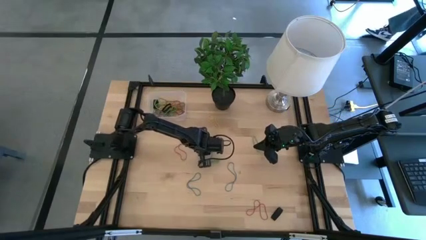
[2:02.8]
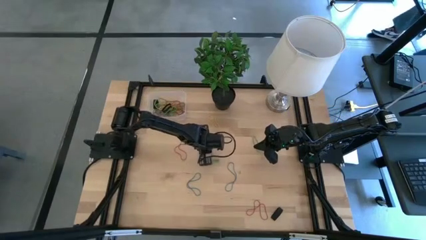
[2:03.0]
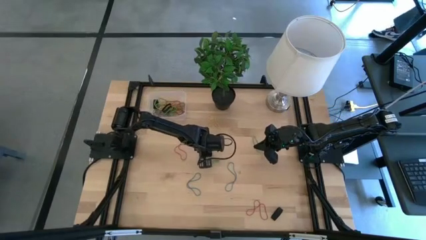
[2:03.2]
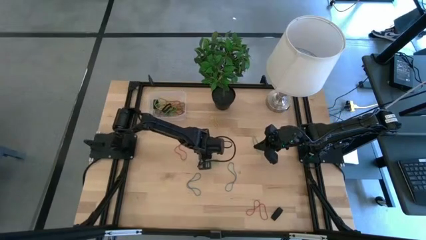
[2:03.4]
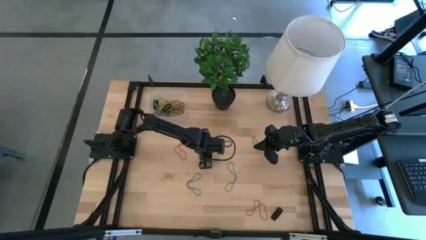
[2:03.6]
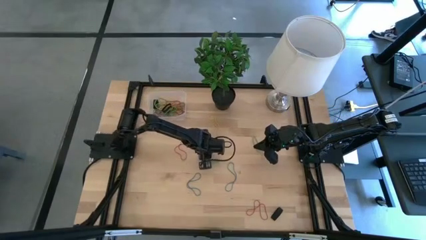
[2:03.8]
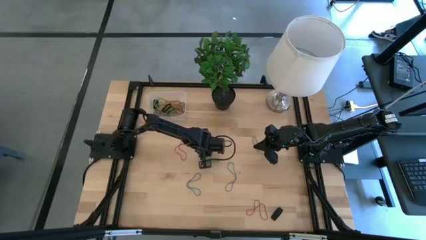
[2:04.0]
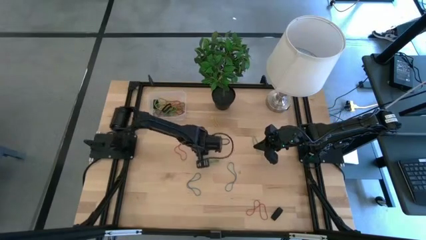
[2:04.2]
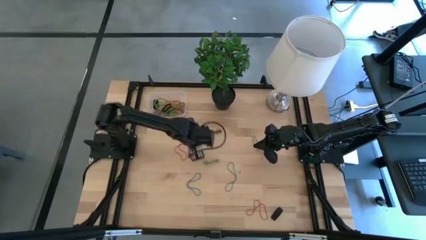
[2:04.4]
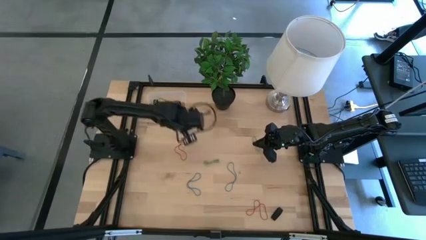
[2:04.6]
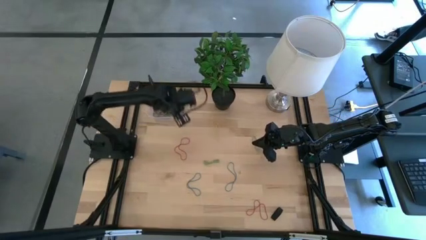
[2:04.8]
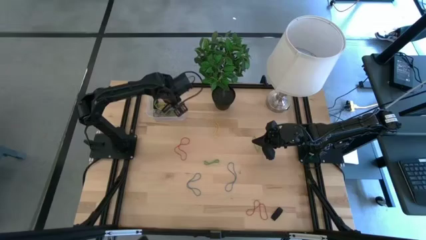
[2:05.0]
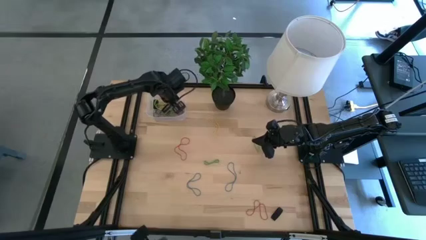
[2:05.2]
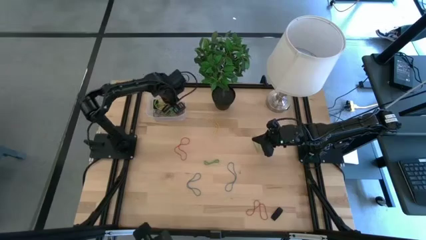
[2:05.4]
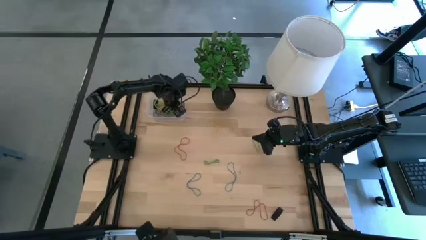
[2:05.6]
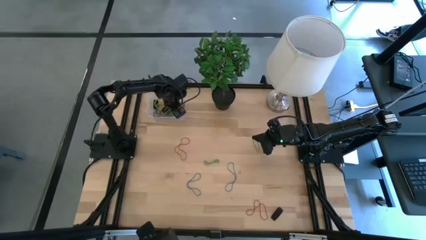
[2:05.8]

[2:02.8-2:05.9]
Task: Pick and place rubber bands into bin
Put the blue rubber band into the transparent bin

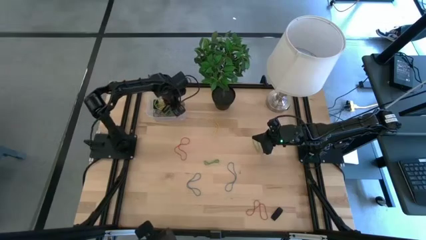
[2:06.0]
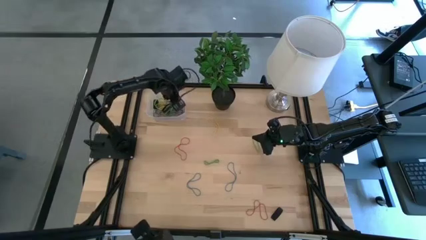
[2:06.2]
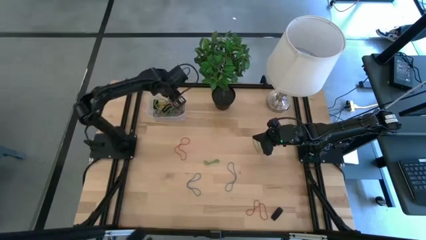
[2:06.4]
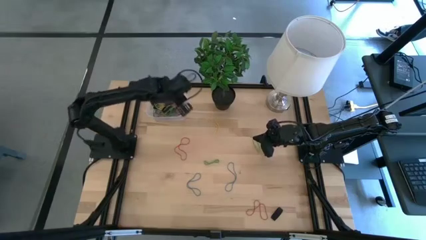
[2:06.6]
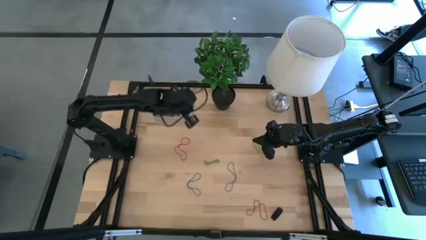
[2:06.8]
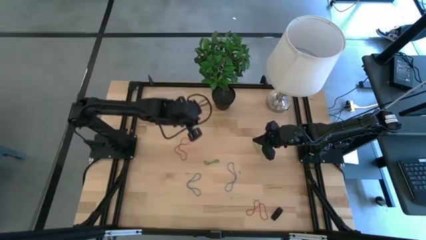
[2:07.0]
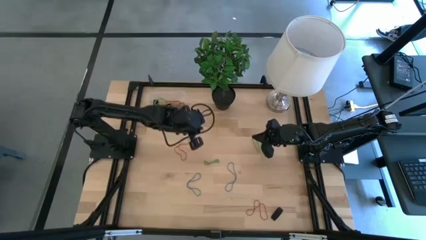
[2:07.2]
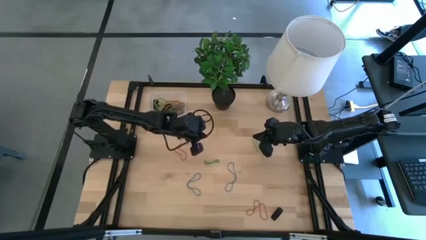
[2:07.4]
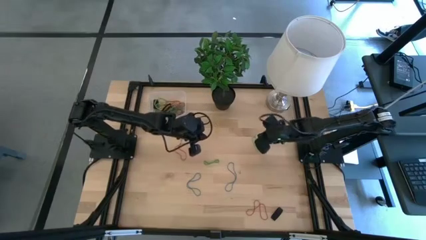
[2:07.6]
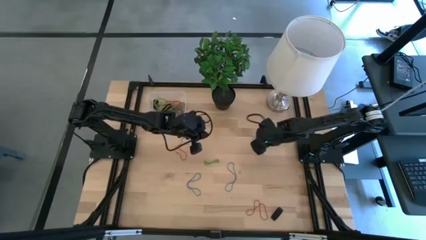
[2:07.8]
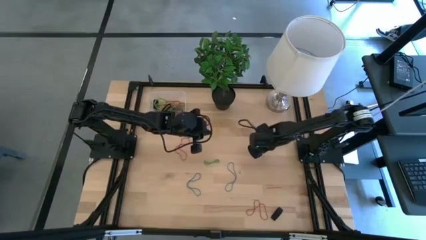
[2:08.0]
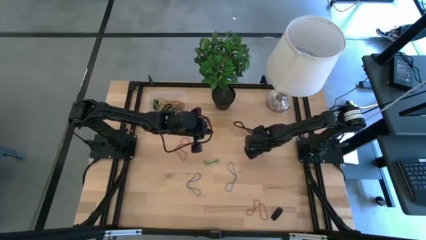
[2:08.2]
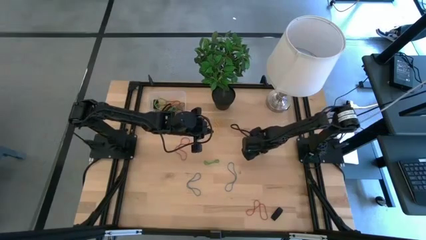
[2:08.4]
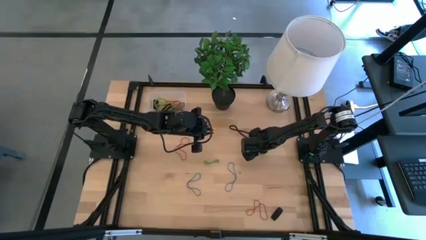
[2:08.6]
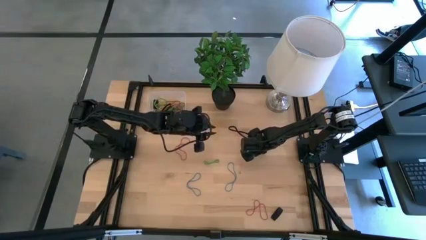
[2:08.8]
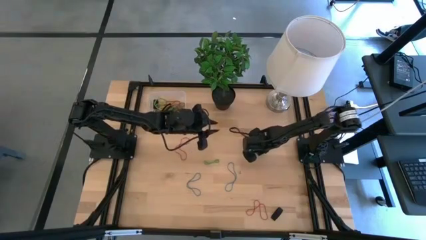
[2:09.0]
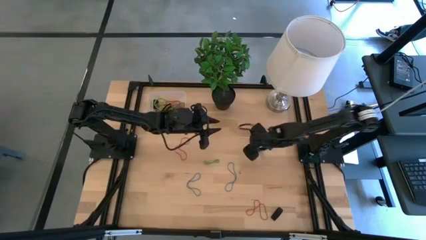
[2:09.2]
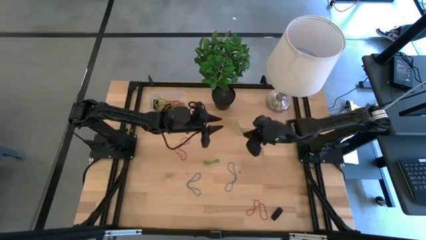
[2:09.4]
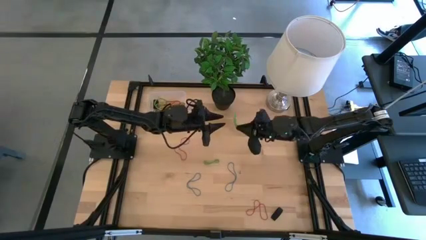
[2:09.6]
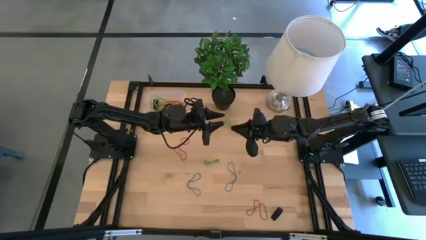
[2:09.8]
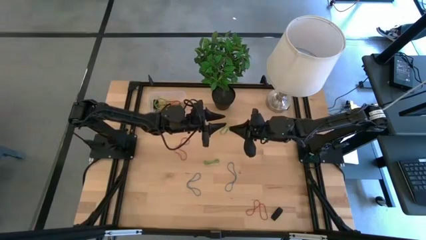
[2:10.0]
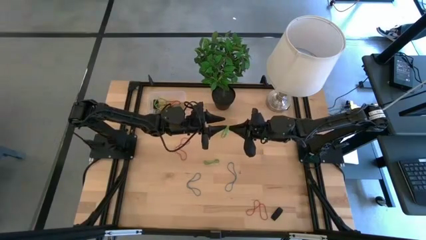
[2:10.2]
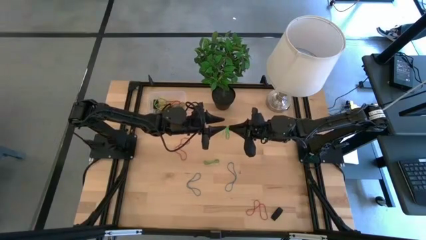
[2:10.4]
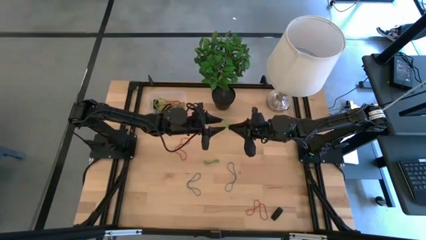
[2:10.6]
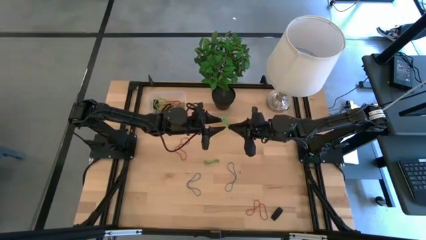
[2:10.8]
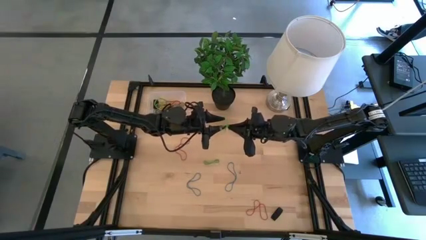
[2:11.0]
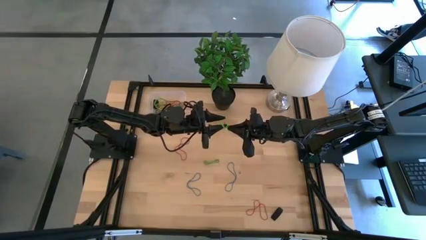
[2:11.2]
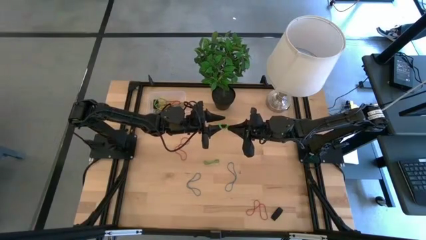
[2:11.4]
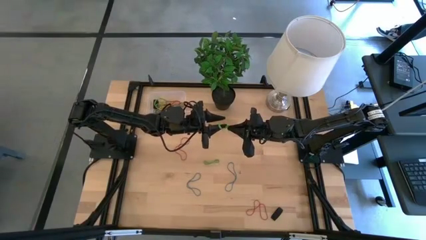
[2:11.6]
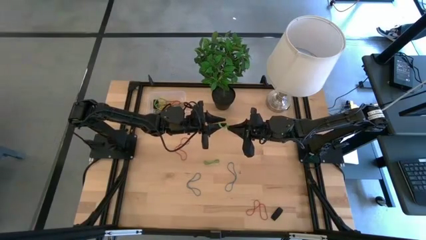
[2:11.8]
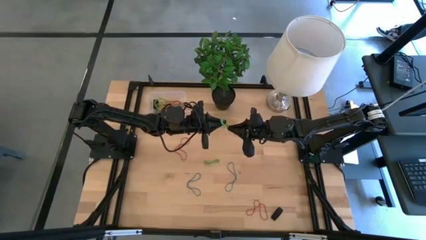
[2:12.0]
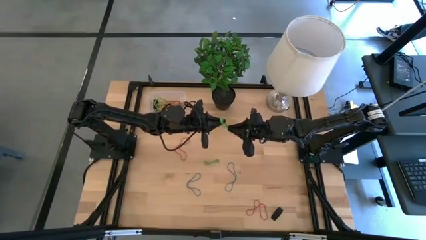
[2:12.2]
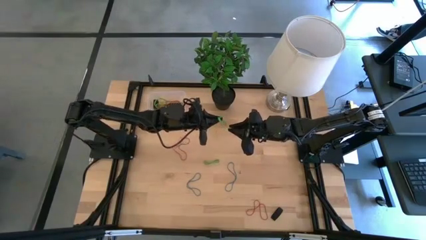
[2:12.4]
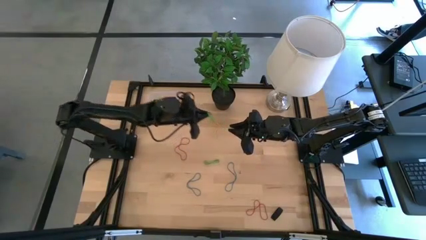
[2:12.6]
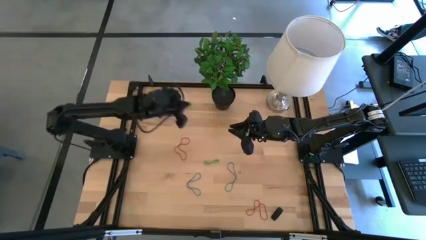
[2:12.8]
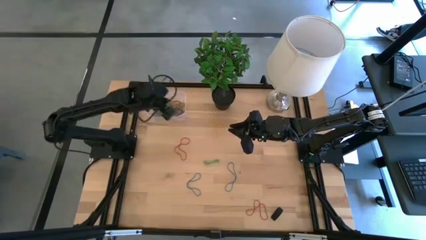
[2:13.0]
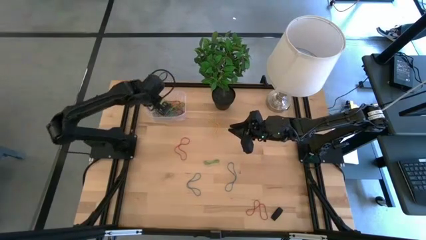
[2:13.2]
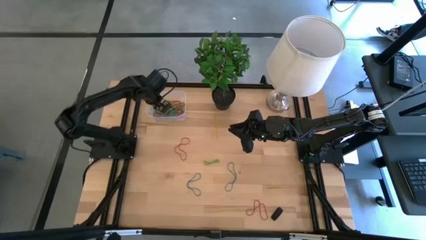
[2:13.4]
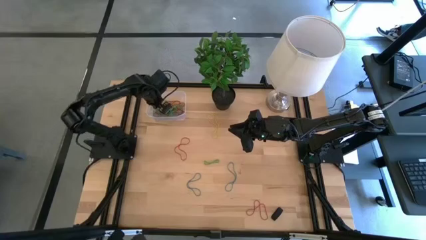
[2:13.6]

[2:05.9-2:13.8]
Put the green rubber band into the transparent bin

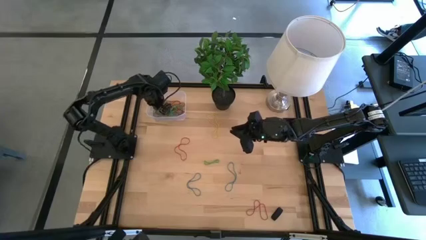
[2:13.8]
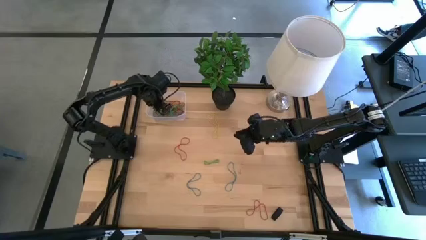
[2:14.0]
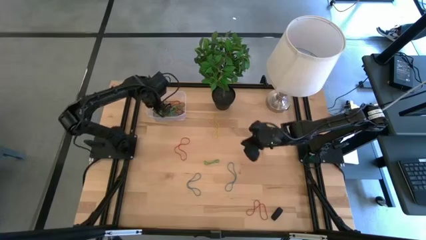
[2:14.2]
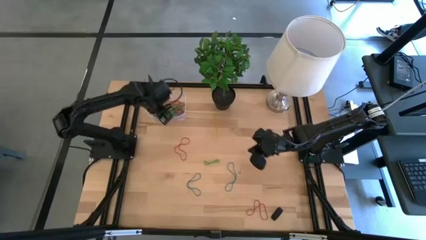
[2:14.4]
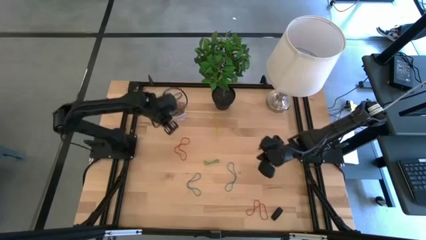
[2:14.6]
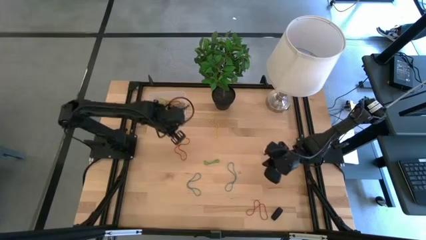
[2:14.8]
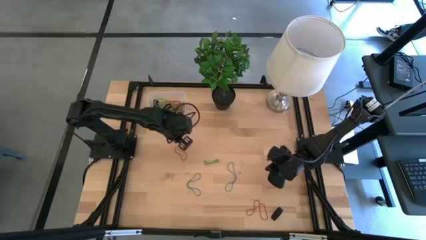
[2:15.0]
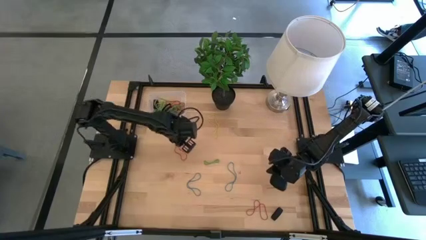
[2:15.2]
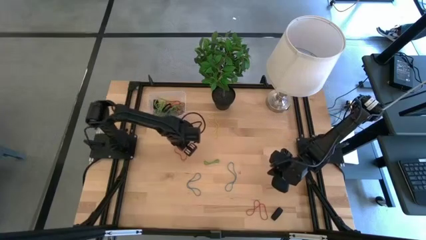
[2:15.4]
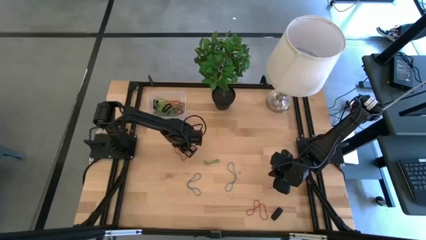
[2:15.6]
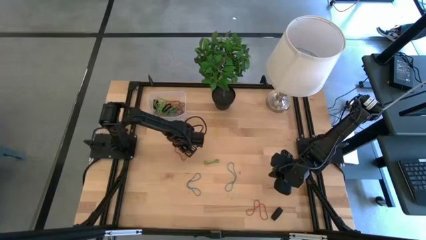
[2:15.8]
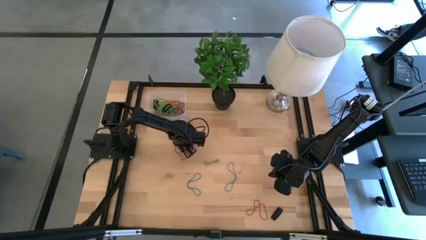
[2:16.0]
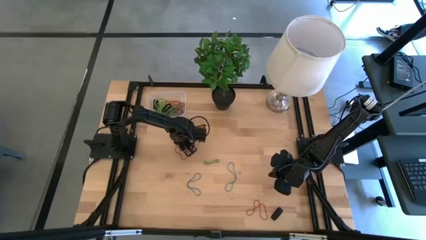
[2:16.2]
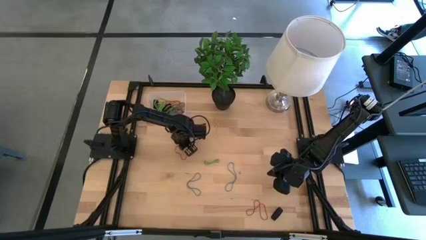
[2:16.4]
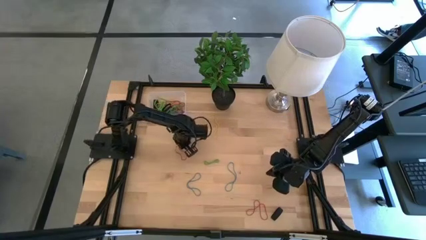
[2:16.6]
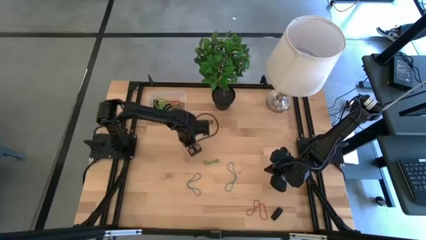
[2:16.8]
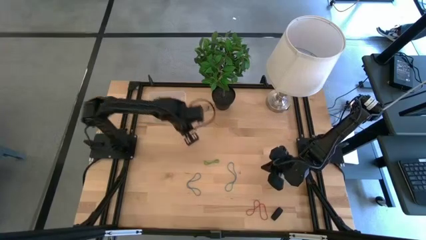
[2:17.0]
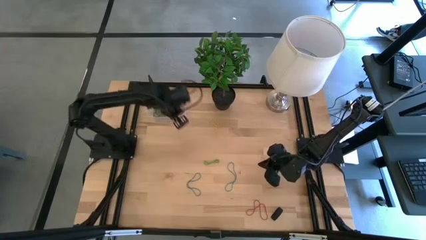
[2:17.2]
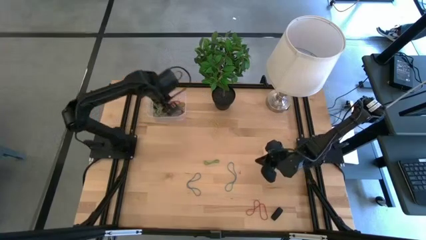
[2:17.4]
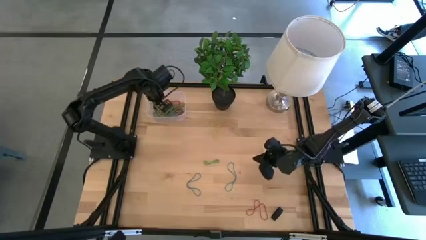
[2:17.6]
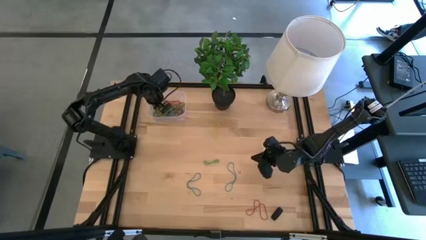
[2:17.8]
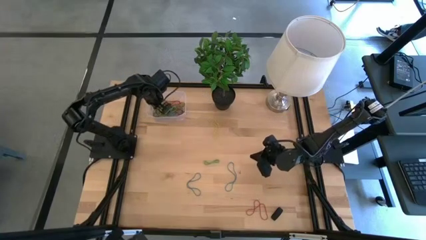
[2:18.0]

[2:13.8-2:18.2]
Put the red rubber band into the transparent bin

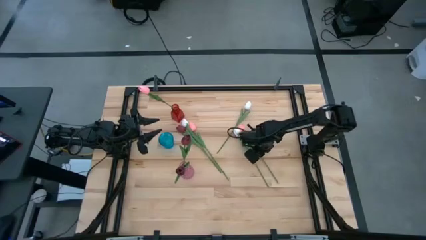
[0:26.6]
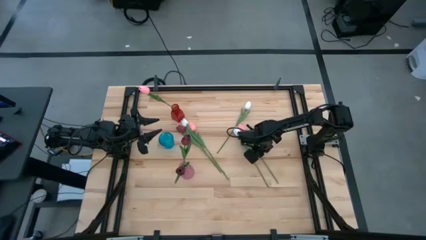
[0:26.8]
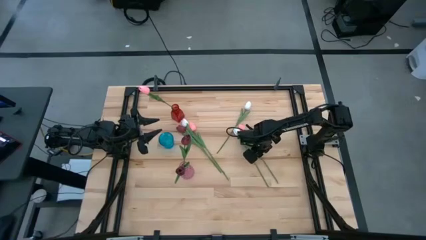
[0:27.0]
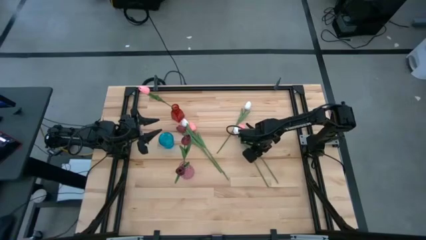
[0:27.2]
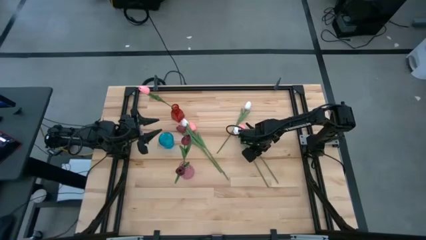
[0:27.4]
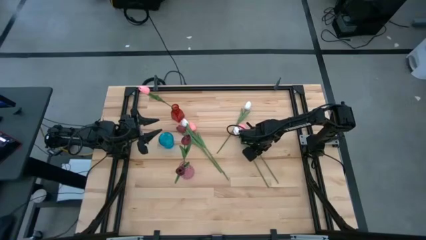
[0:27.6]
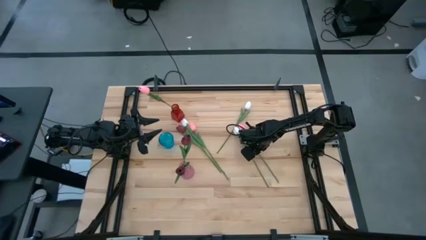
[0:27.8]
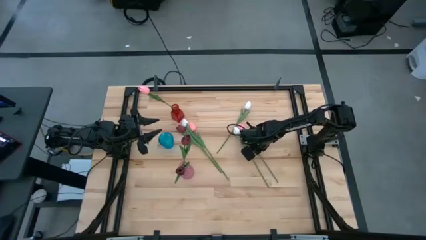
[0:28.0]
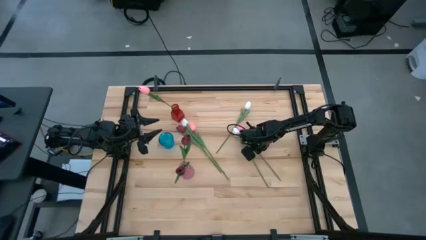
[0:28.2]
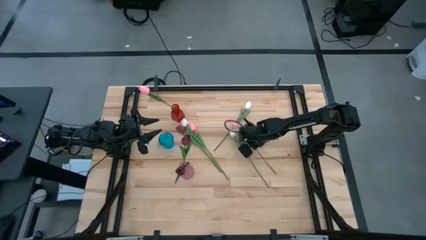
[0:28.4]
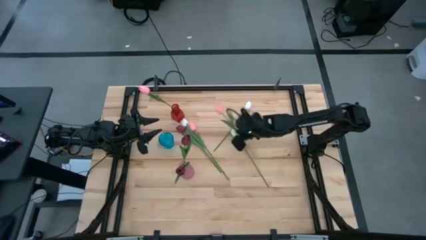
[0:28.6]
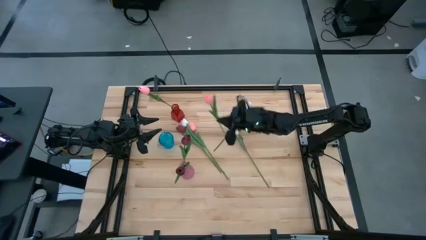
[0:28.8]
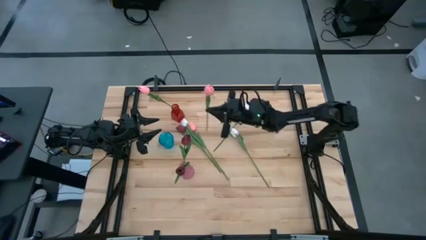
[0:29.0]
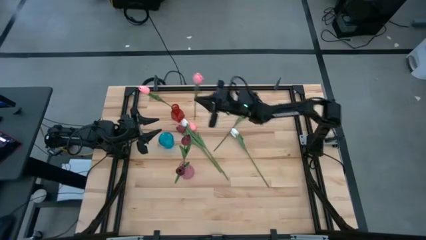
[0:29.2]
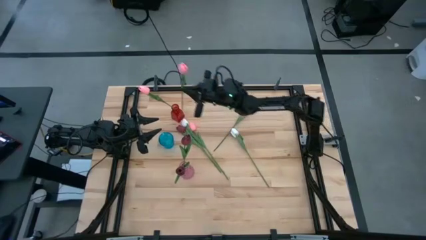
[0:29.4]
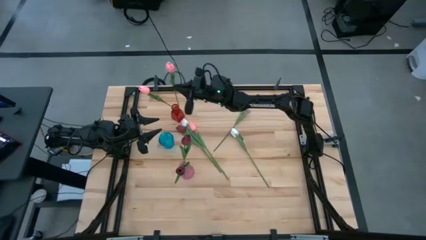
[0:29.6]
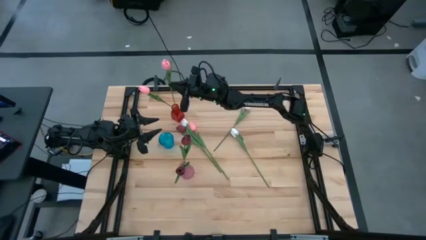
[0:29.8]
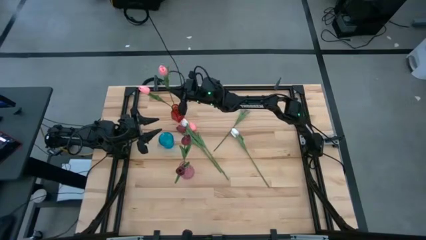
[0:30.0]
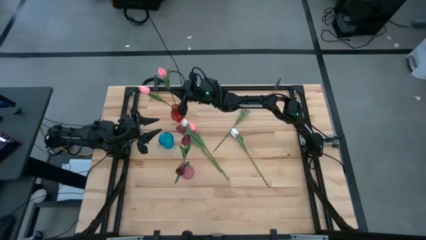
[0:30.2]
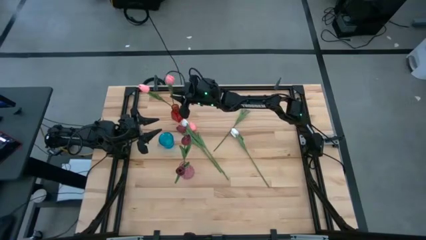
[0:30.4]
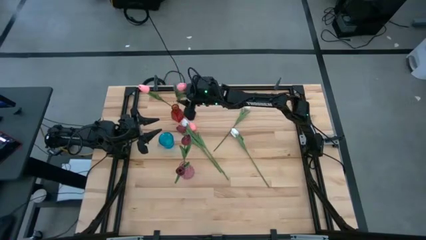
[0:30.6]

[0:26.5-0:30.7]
Task: Sort flowers into vase by color
Put the right pink tulip into the red vase
